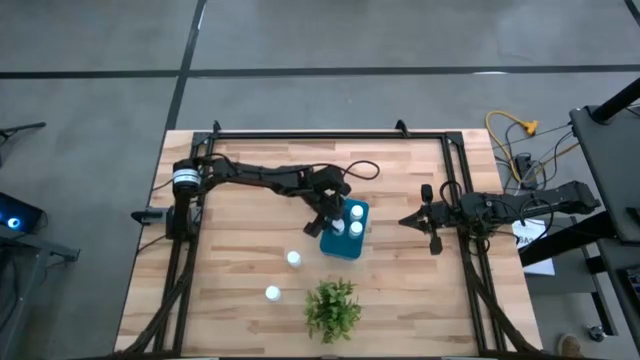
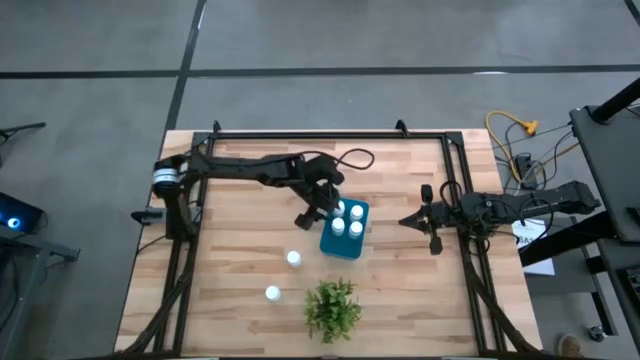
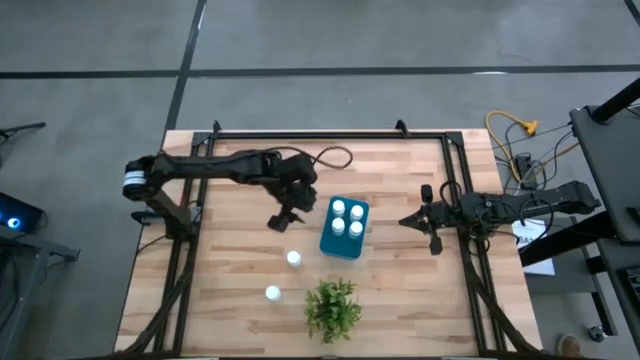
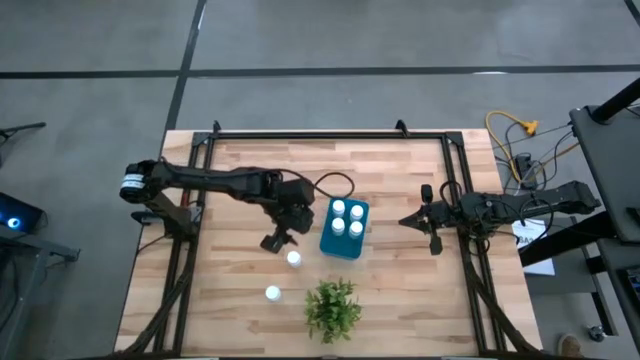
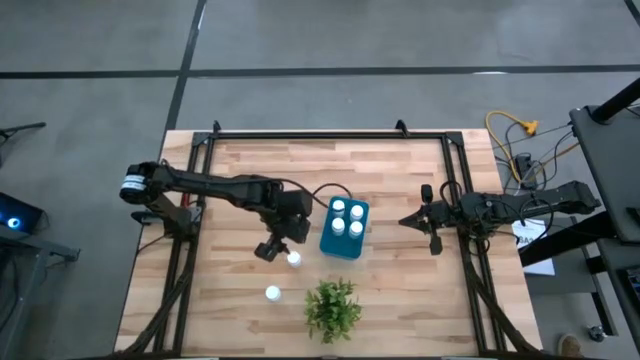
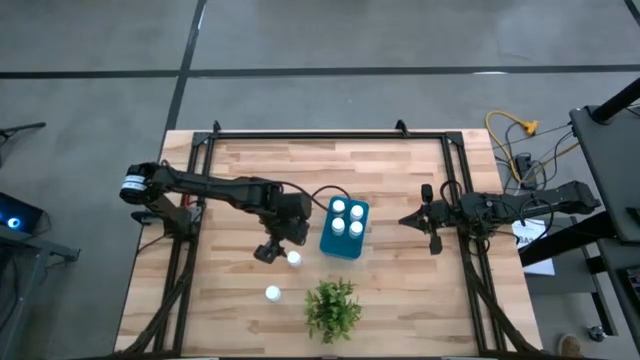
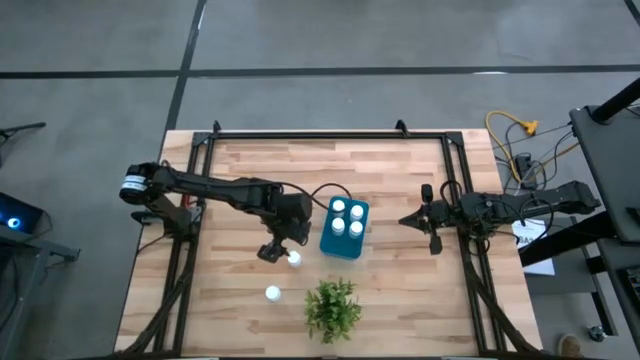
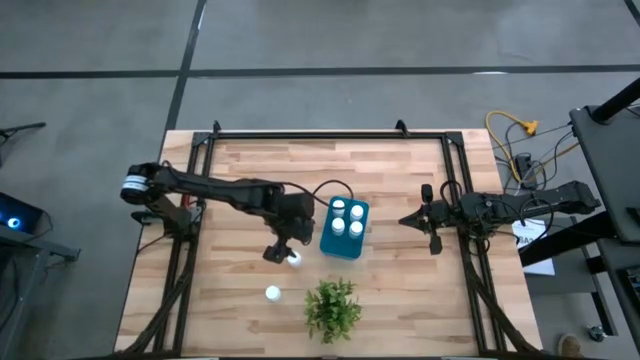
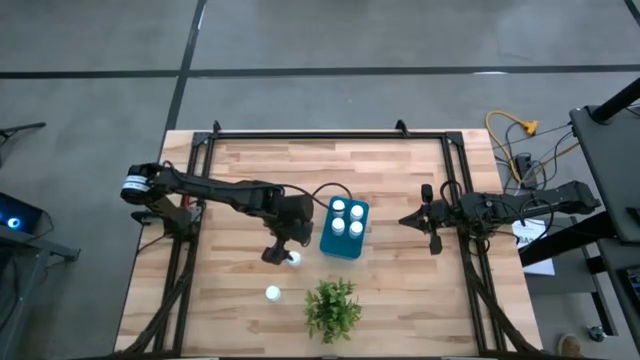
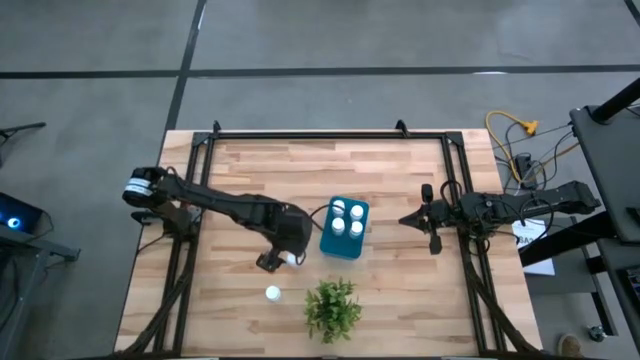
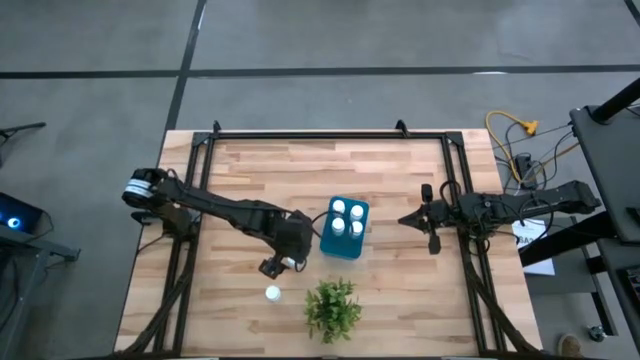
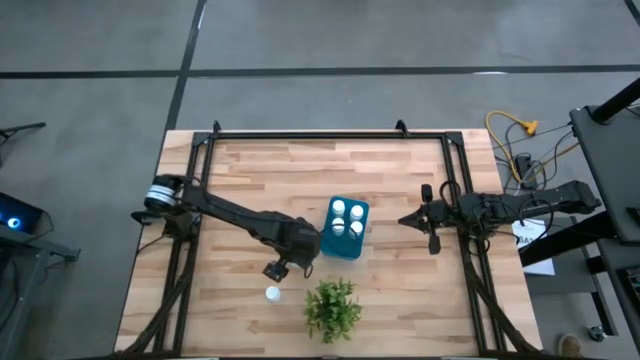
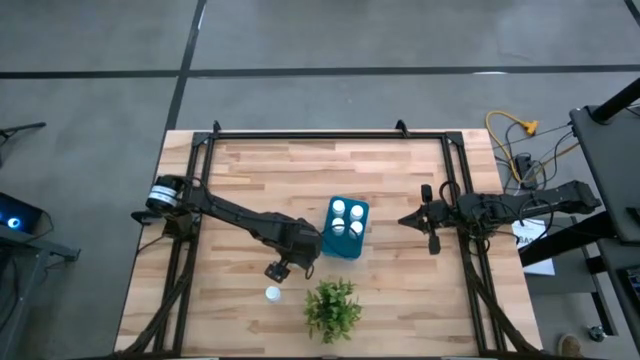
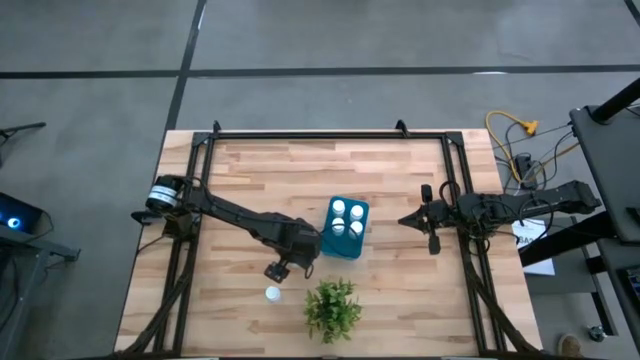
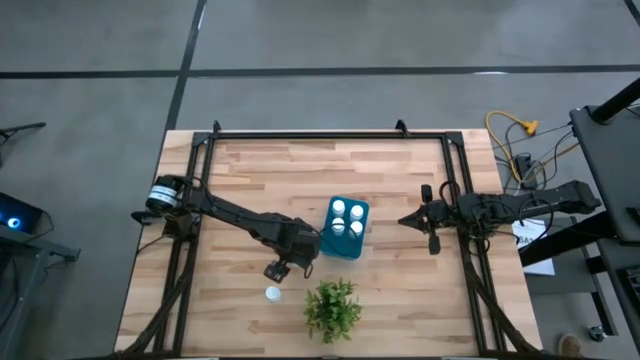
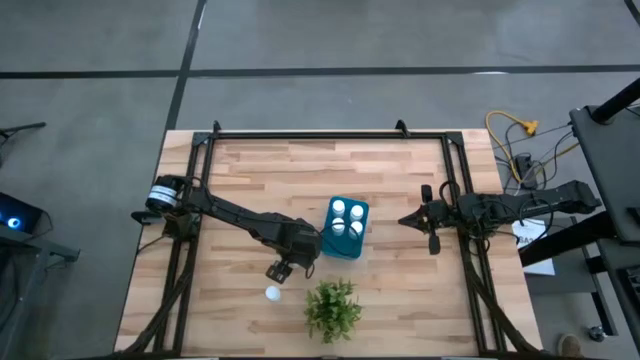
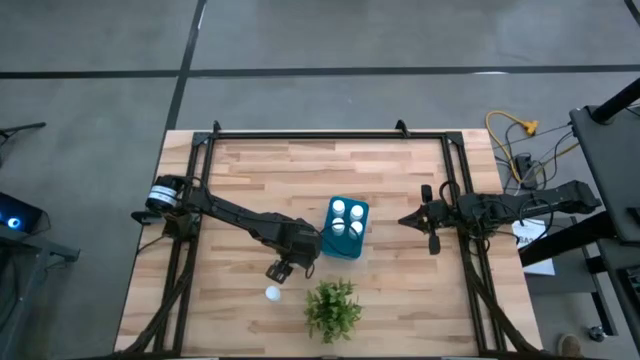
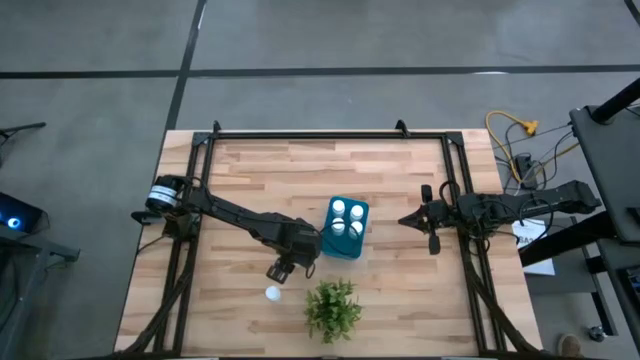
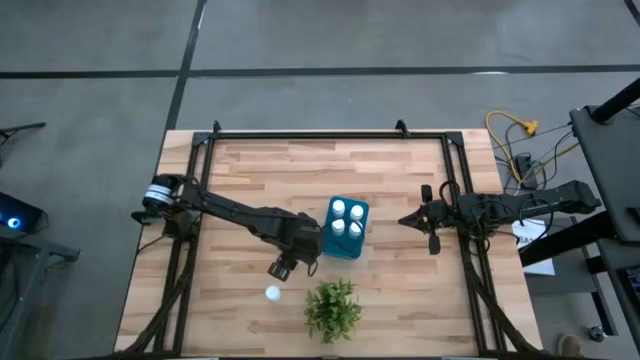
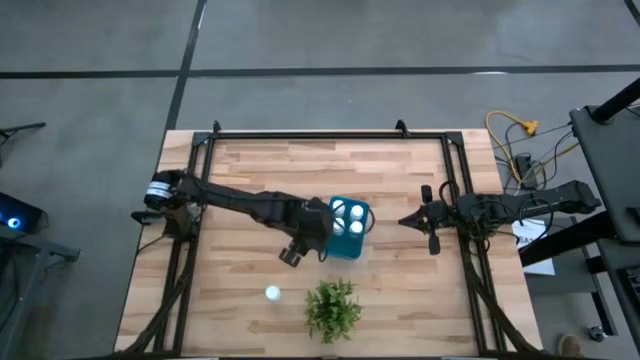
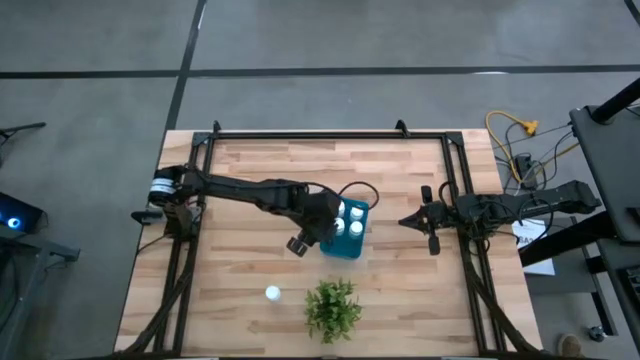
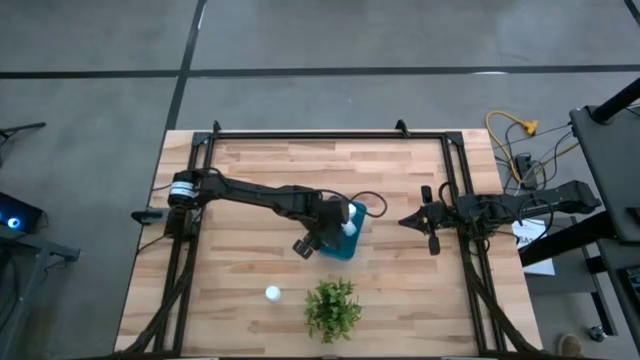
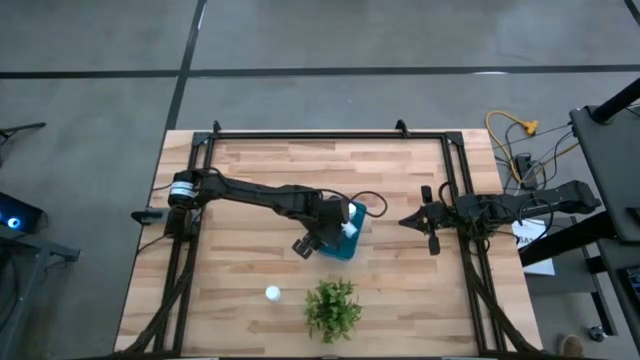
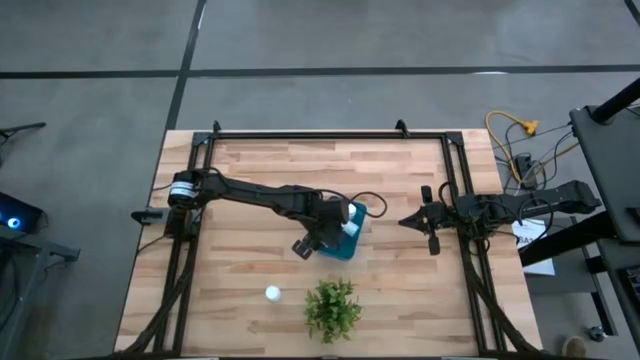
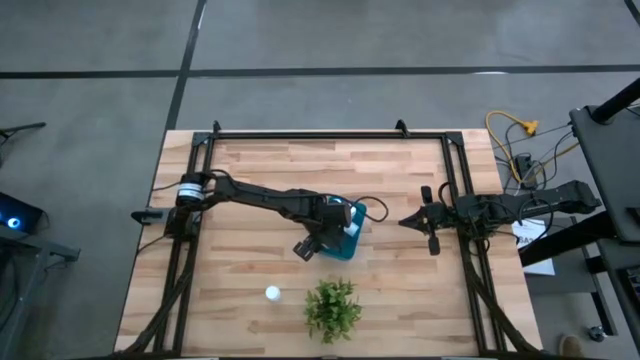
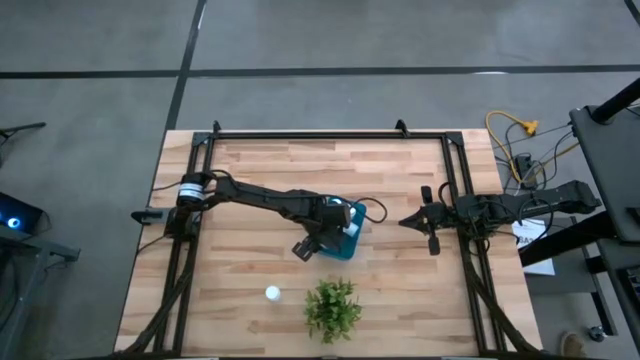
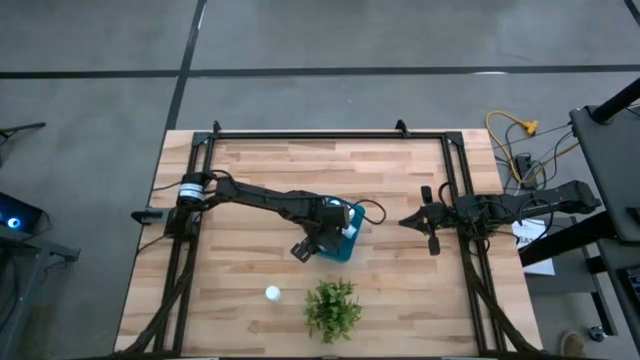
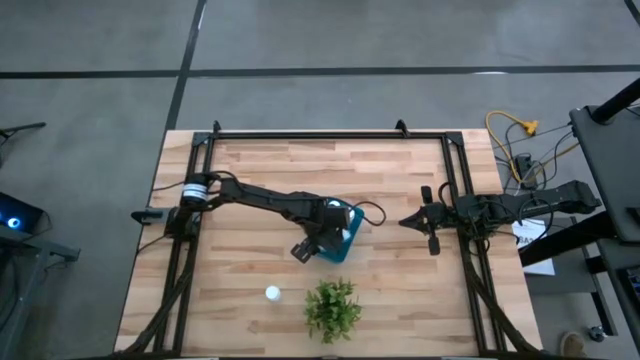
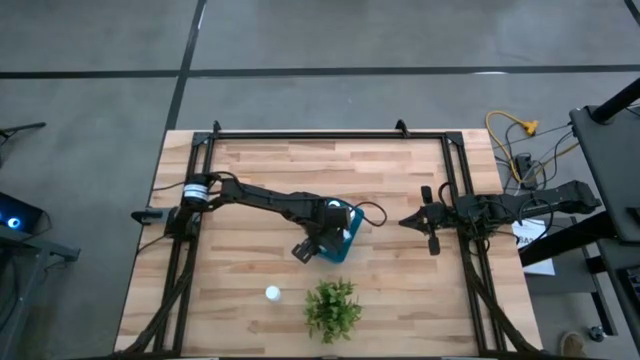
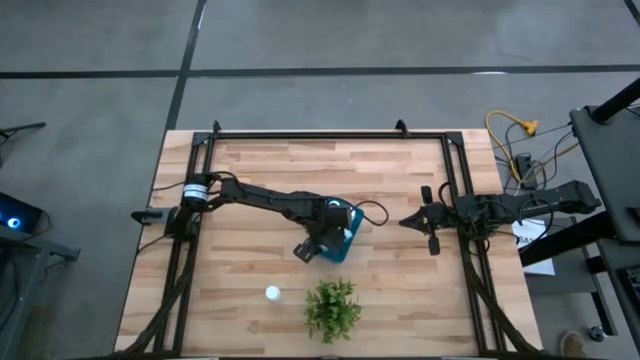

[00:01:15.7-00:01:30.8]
Task: Pick and place pill bottles into a basket
Put the white pill bottle into the blue bin

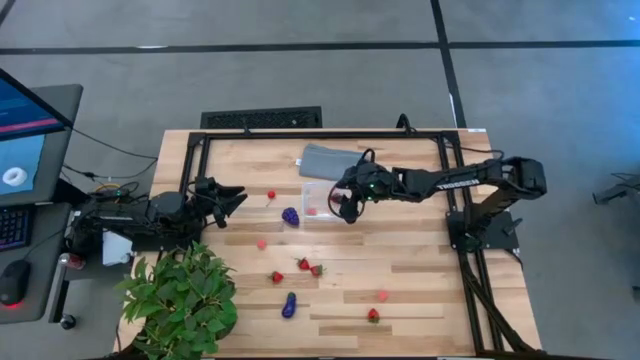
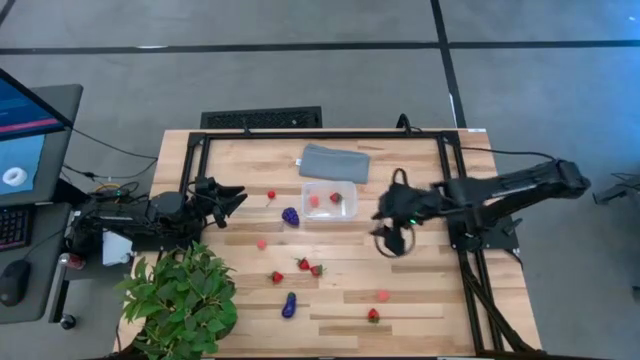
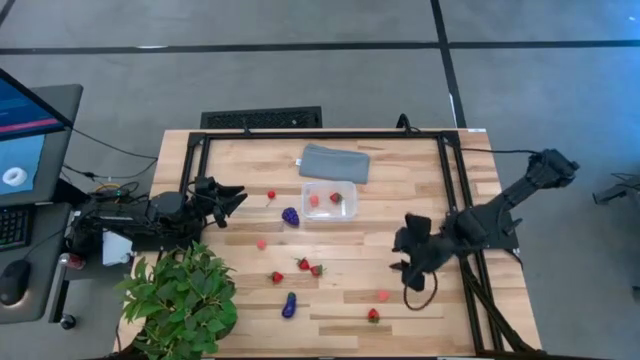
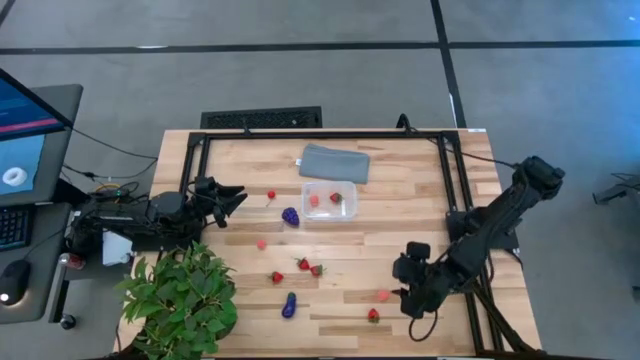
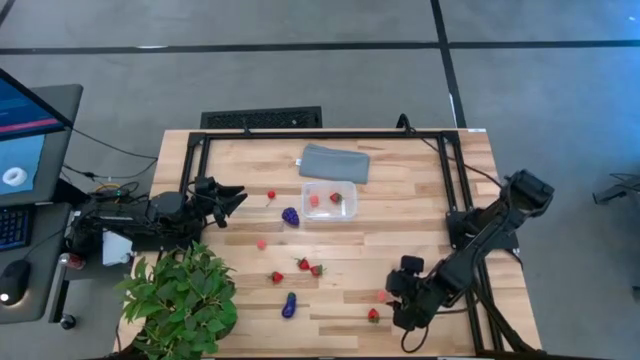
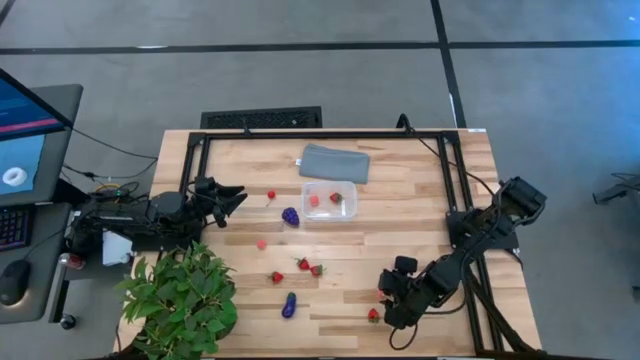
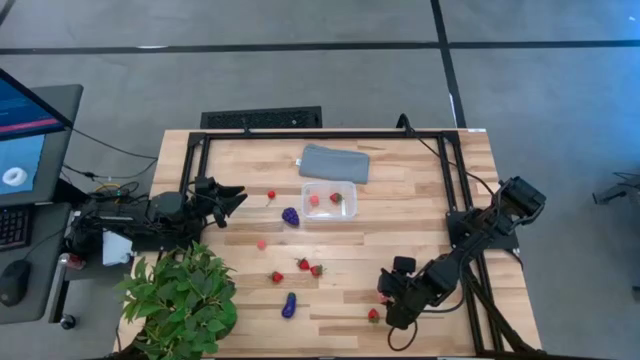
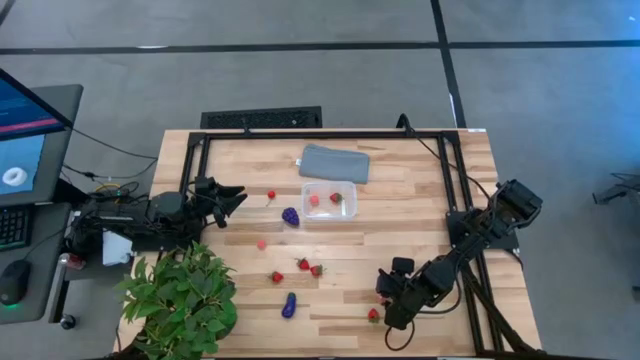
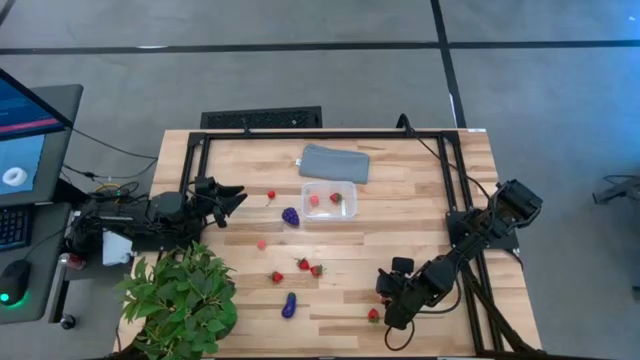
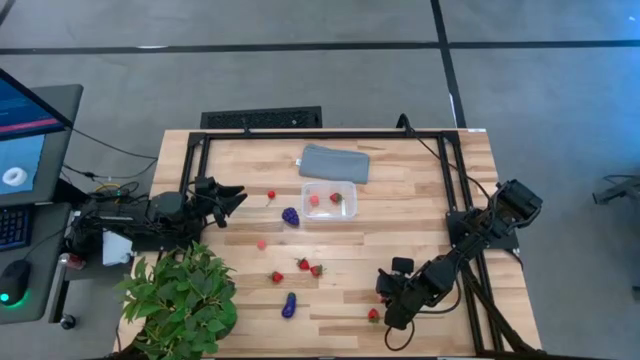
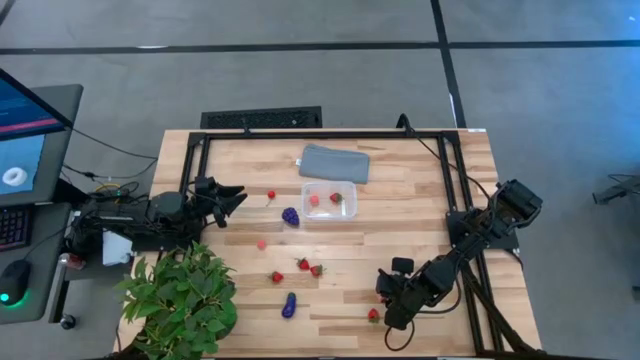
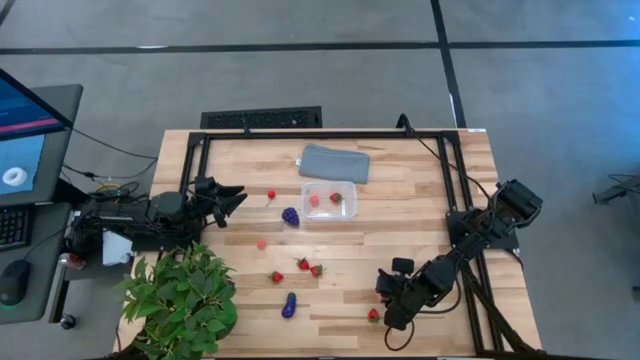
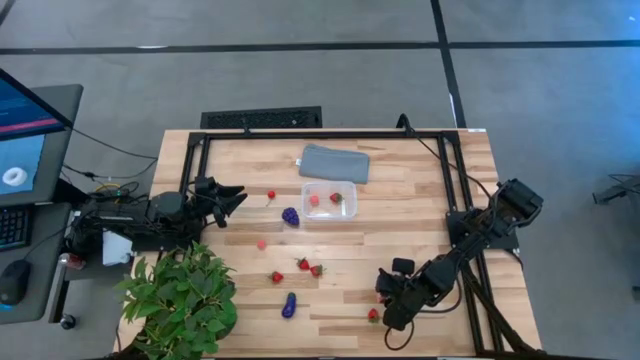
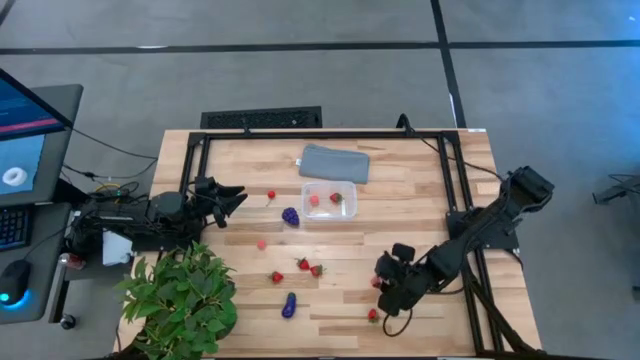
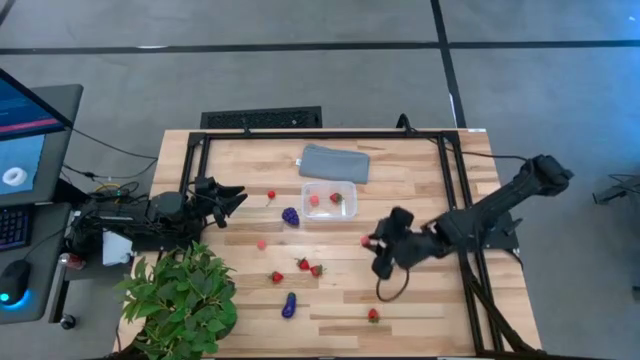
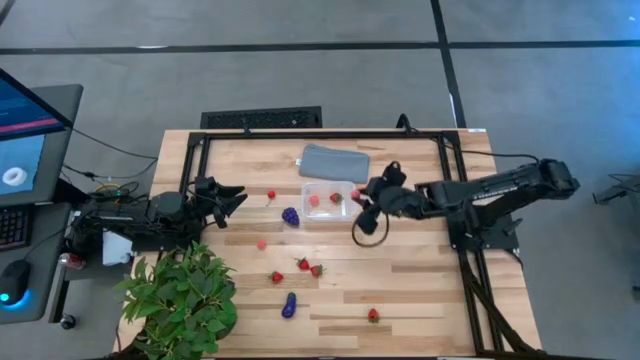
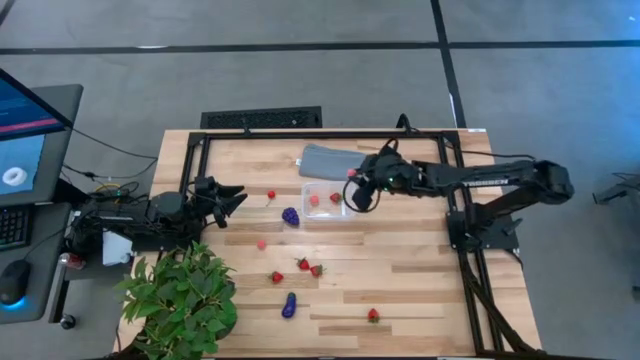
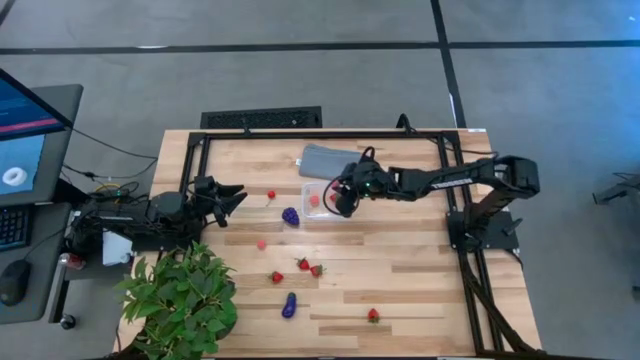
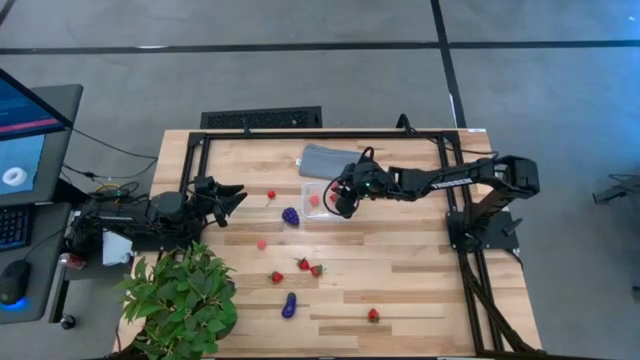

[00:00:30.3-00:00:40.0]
Task: Pick and placing Produce into tupperware
Put the pink peach into the transparent bin
